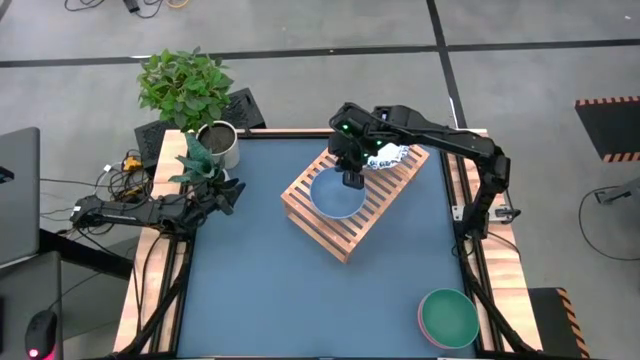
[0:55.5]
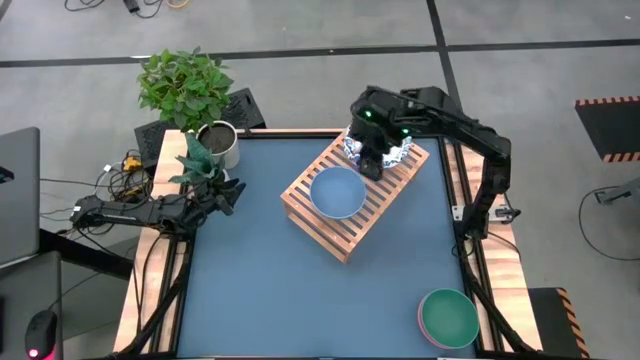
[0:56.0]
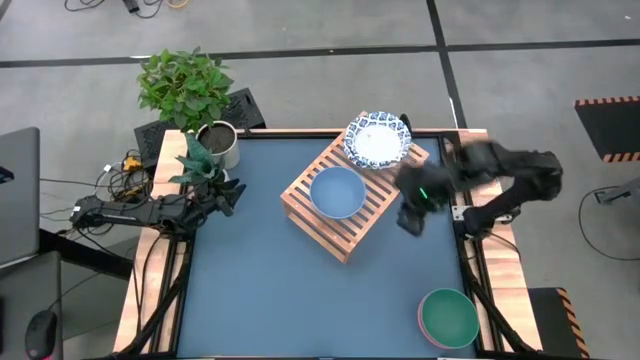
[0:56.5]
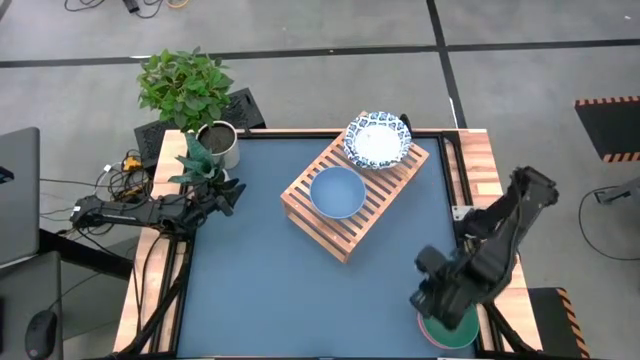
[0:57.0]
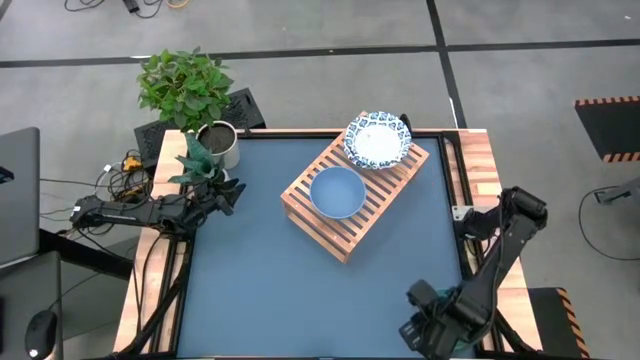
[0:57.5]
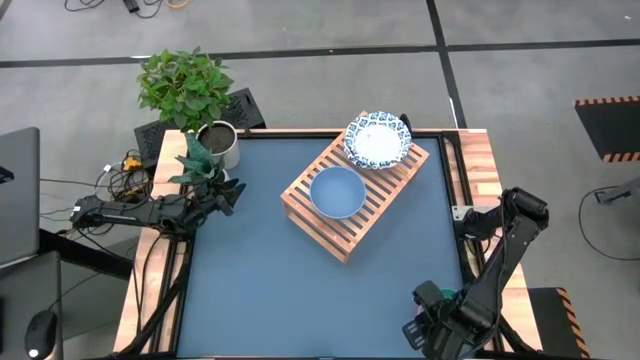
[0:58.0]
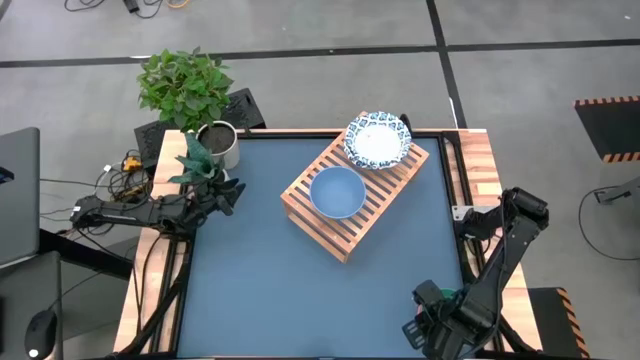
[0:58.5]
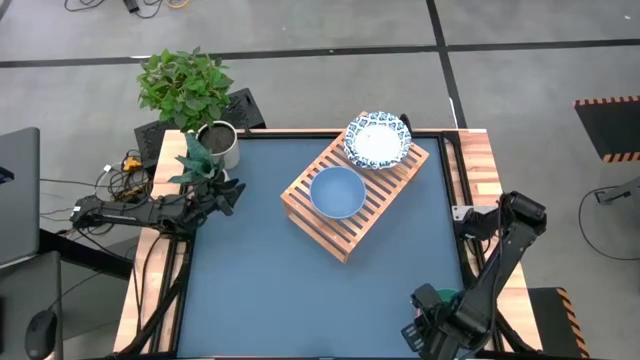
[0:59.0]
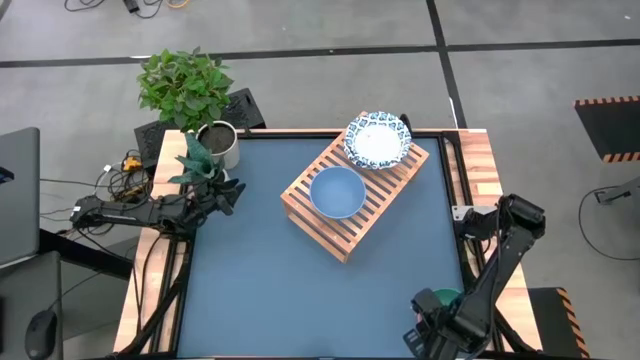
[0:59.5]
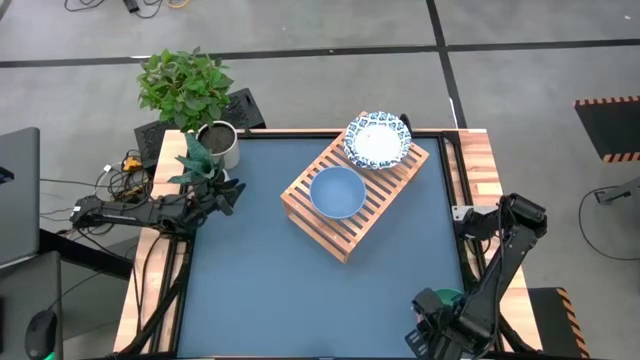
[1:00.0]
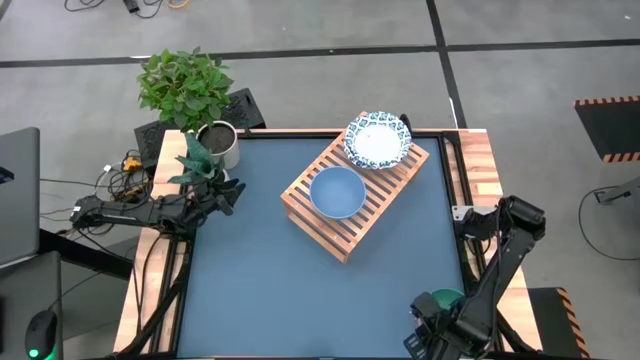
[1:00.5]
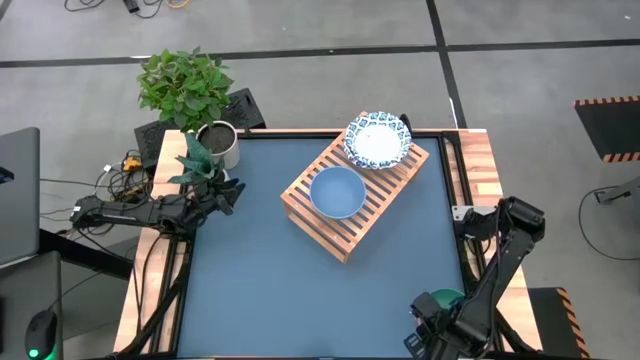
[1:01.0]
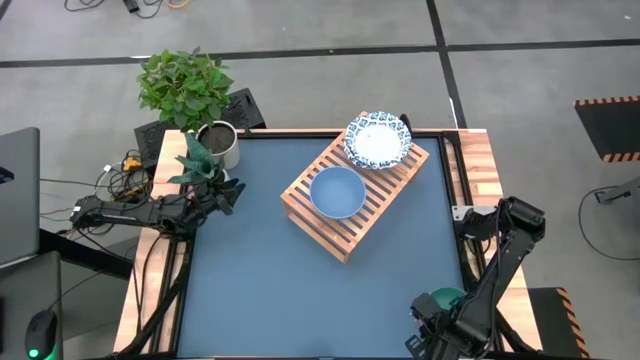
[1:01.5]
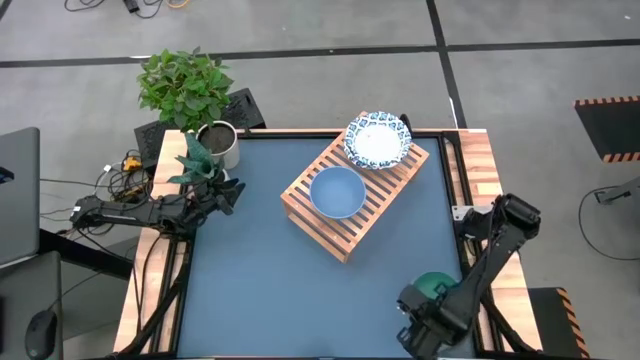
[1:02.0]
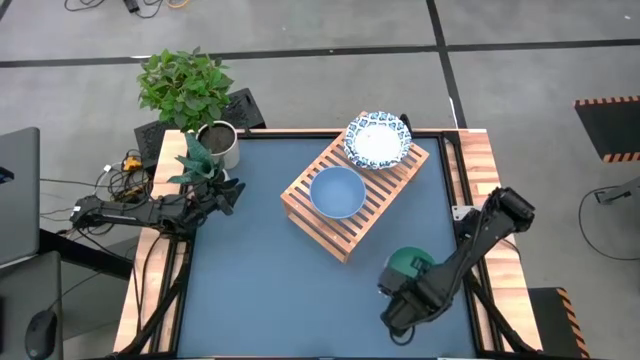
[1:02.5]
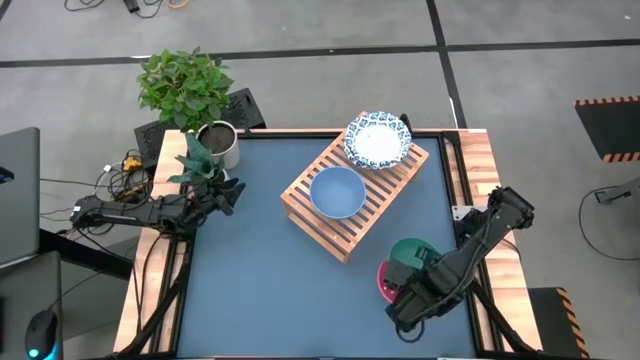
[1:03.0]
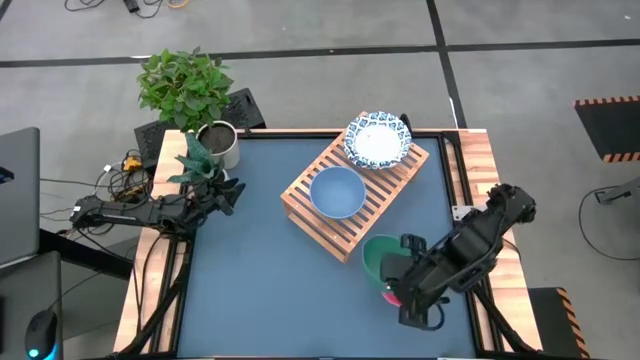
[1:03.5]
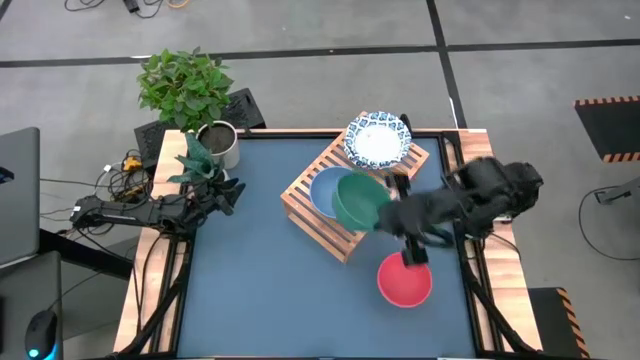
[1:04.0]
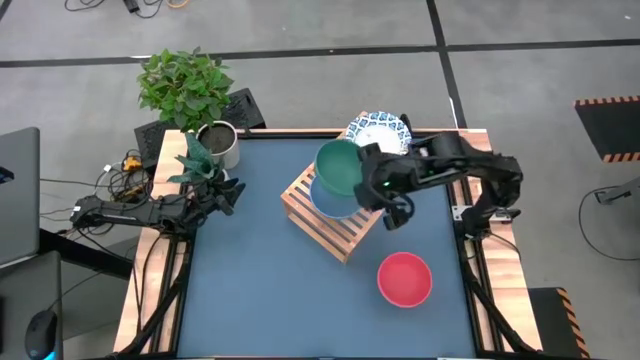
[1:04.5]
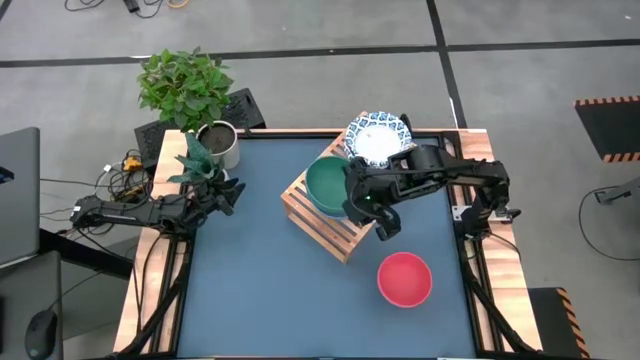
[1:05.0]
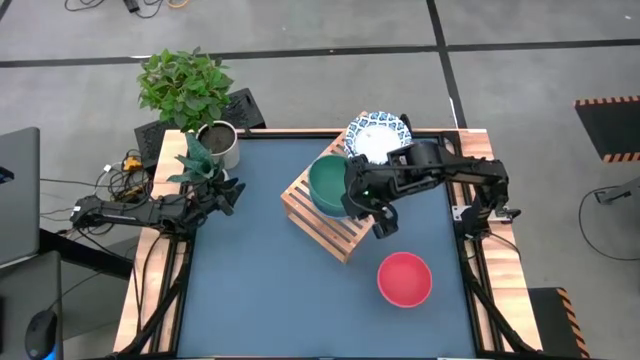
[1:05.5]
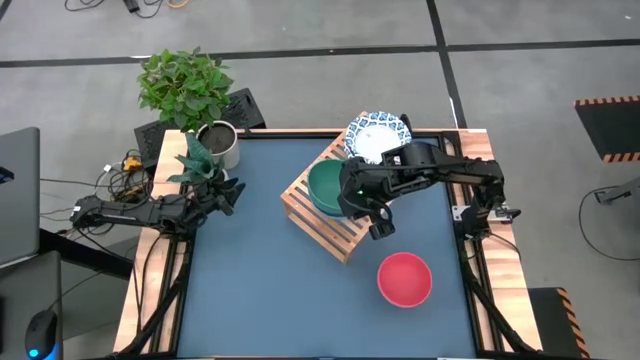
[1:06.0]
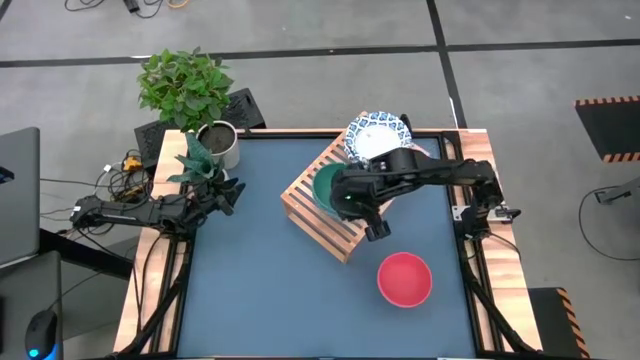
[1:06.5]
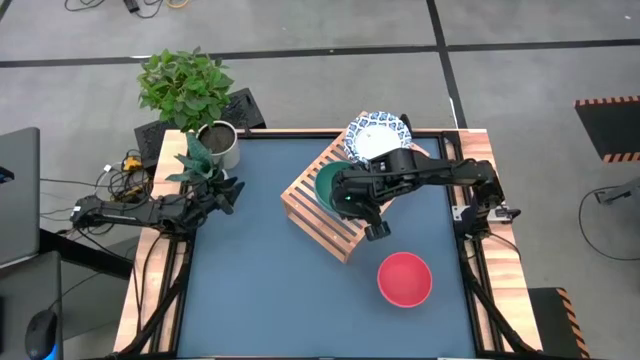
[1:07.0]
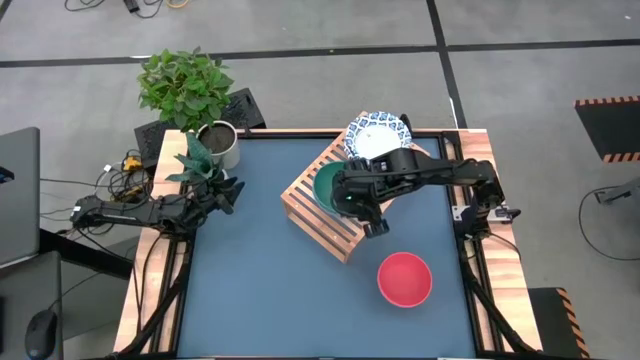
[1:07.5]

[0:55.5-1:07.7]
Task: Place and stack bowls onto a shelf
Stack the green bowl on top of the blue bowl

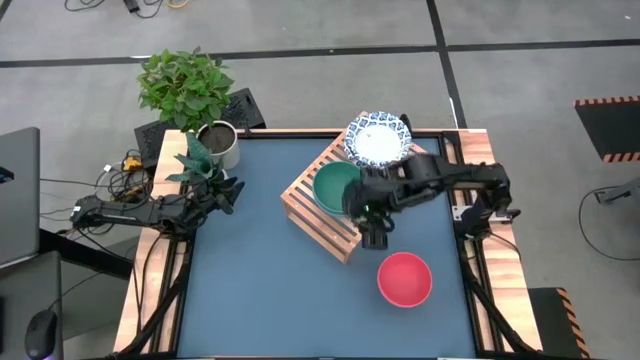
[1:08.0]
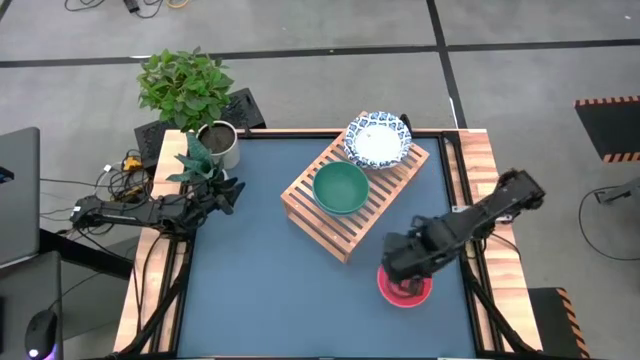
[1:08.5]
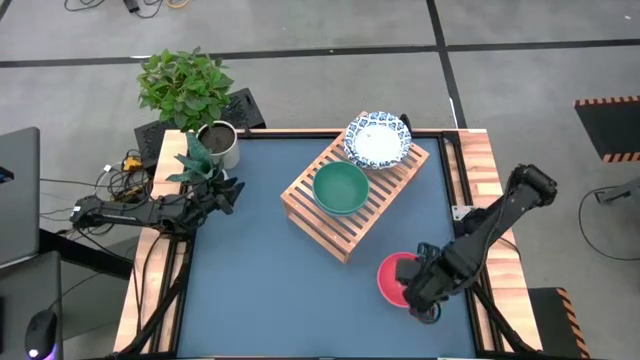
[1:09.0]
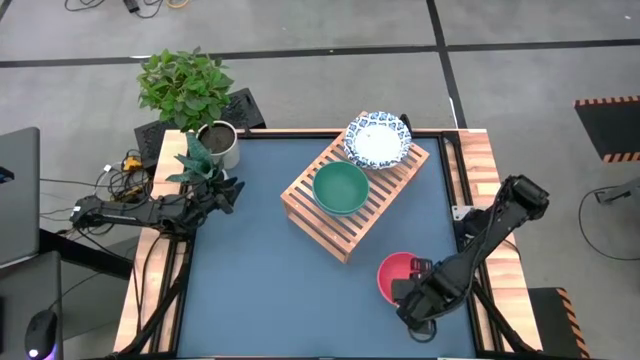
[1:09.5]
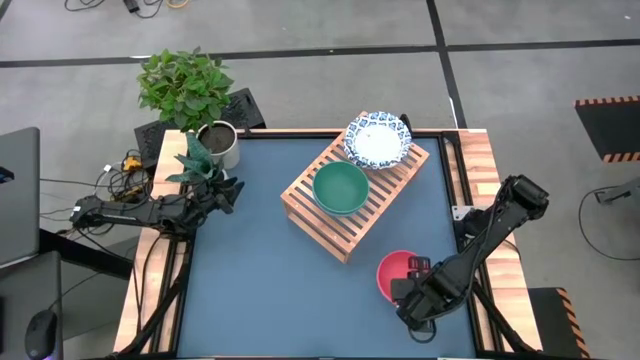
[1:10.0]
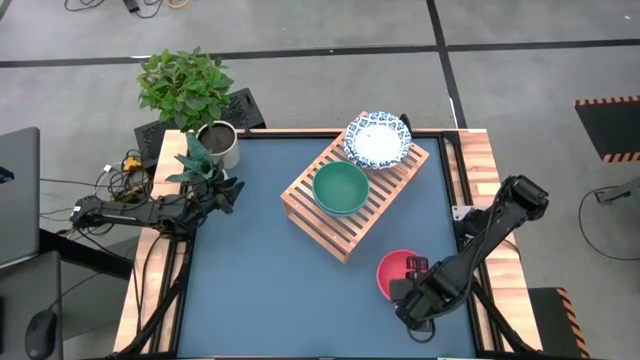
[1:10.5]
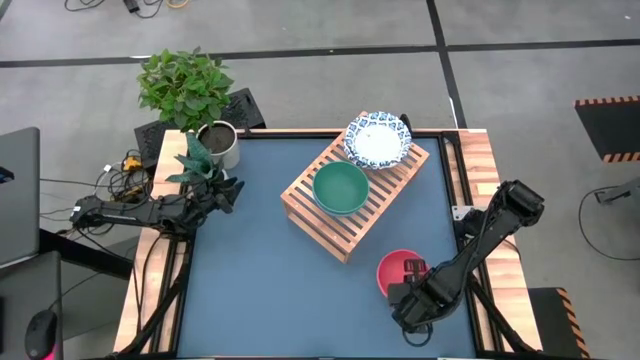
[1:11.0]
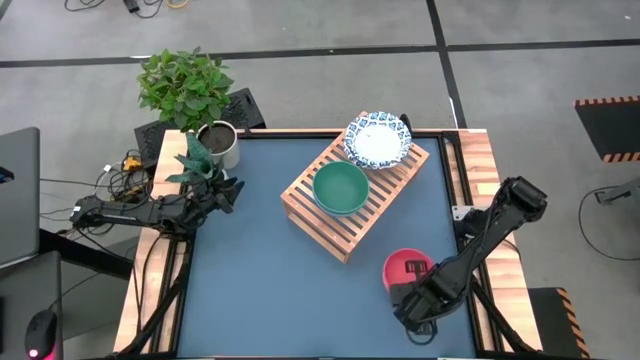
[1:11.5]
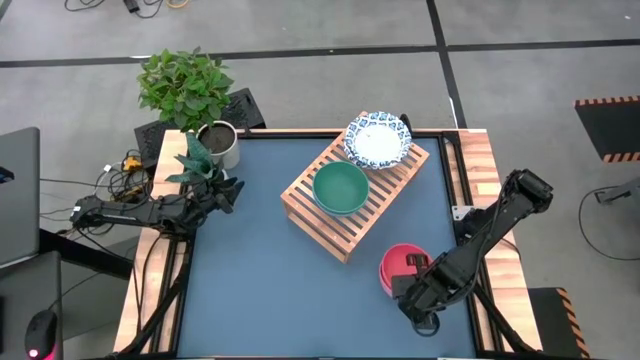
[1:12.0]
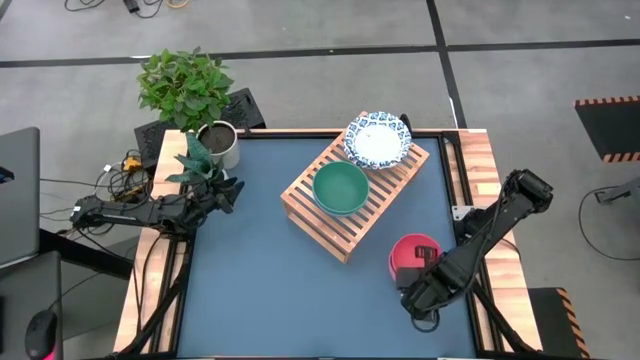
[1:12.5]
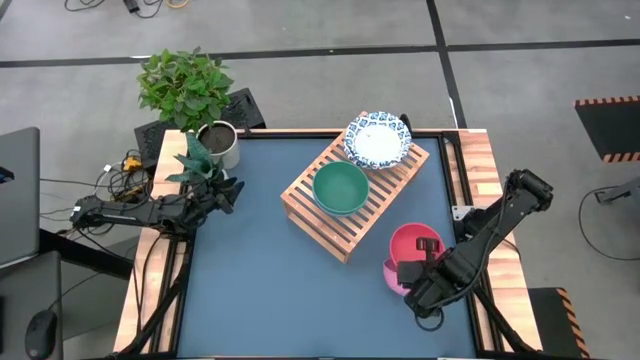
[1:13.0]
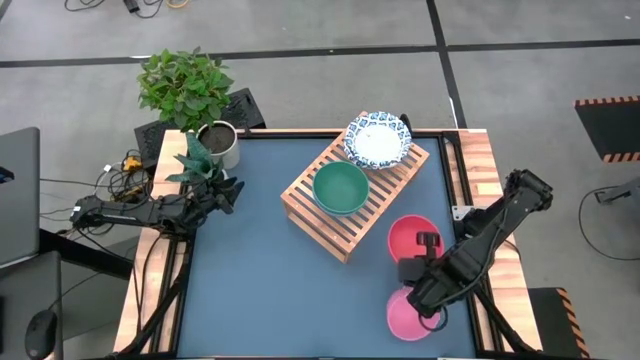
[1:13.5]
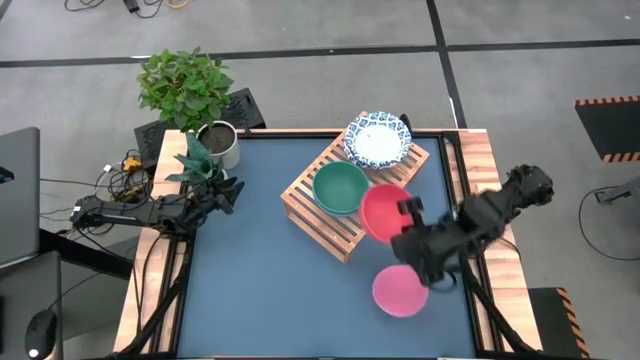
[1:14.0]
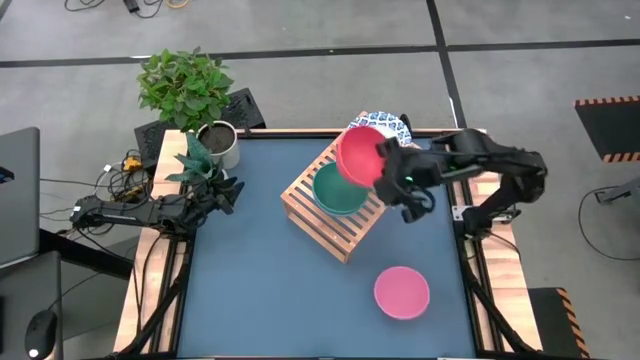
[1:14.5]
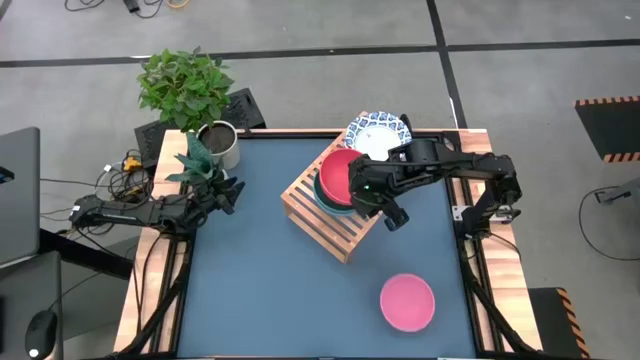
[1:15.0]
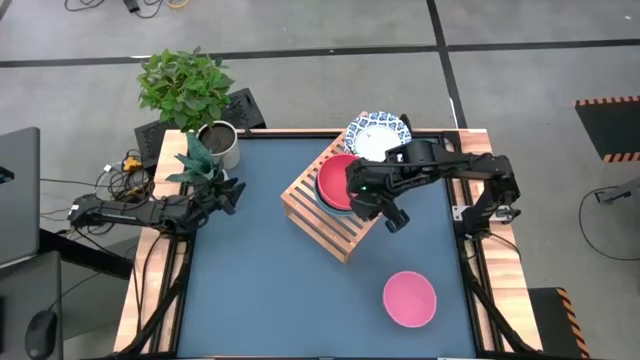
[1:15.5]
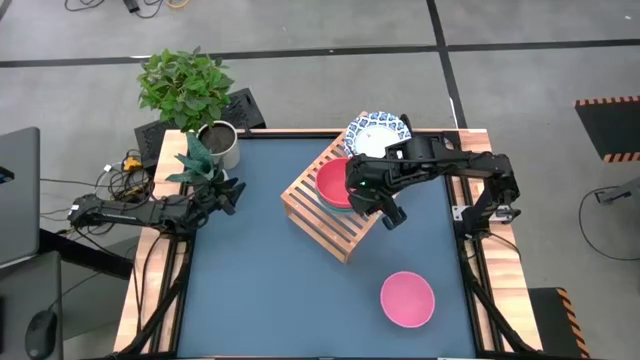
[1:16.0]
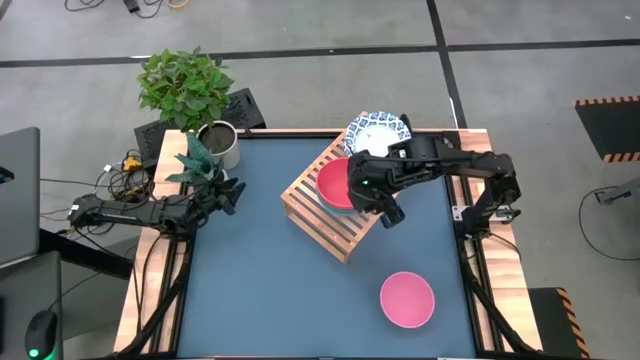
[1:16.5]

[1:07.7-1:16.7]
Stack the orange bowl on top of the green bowl
